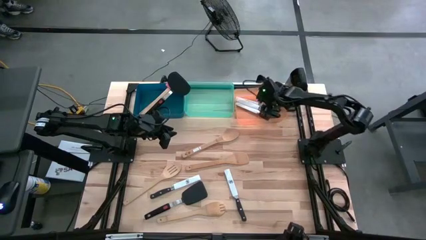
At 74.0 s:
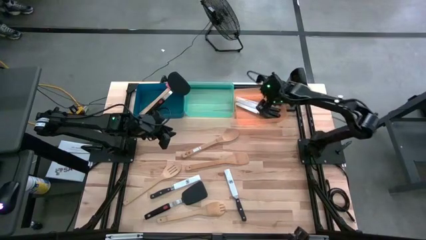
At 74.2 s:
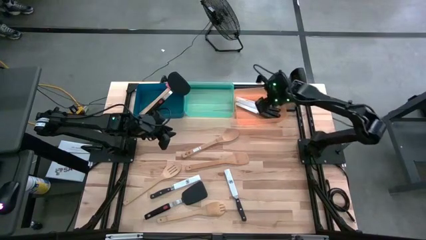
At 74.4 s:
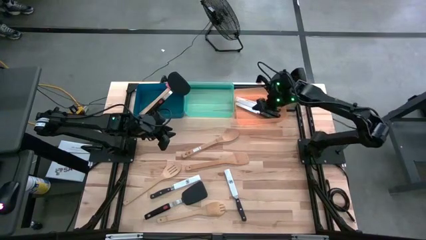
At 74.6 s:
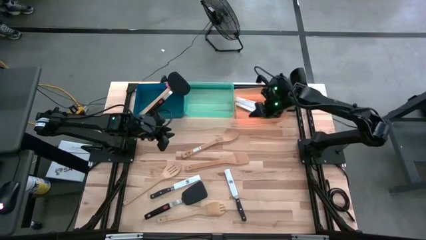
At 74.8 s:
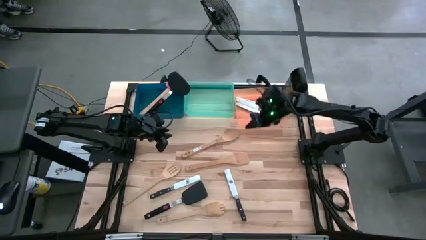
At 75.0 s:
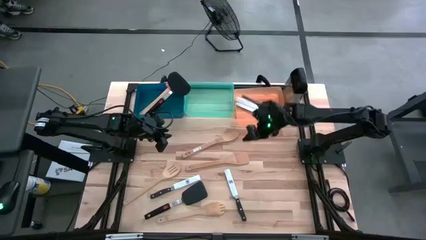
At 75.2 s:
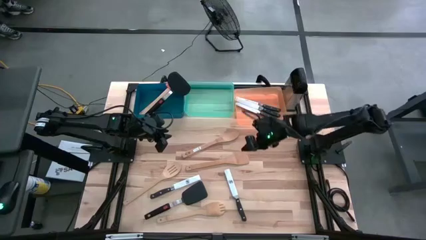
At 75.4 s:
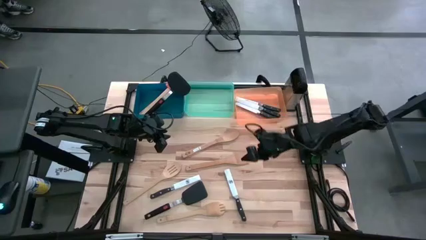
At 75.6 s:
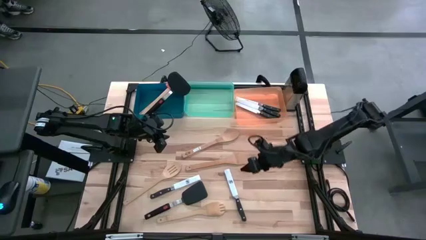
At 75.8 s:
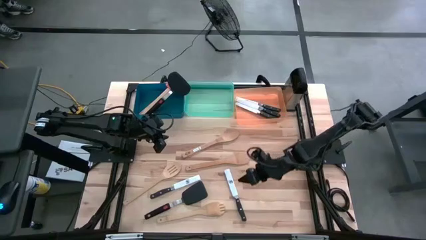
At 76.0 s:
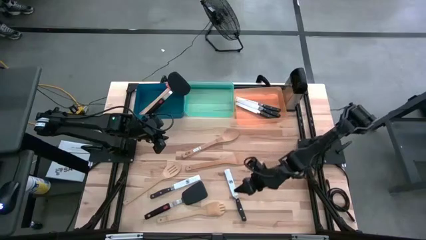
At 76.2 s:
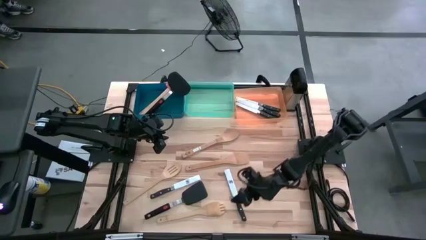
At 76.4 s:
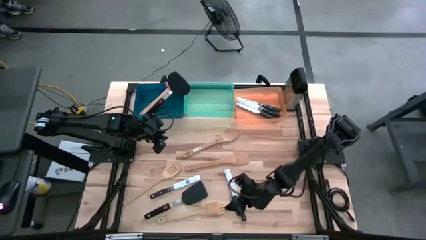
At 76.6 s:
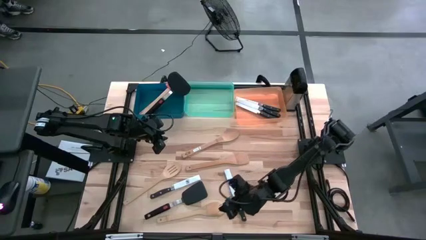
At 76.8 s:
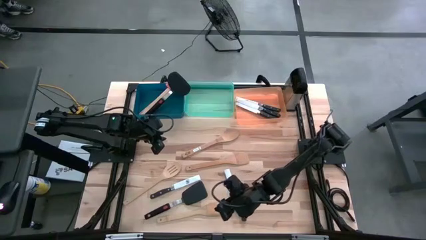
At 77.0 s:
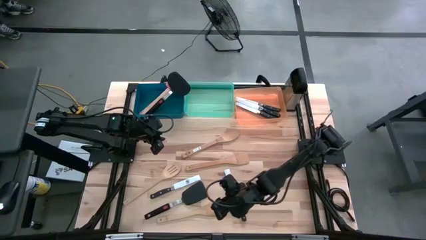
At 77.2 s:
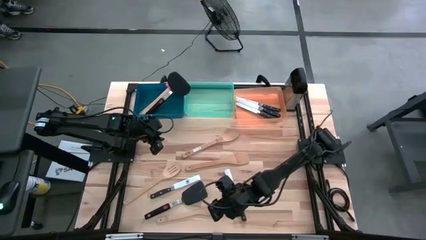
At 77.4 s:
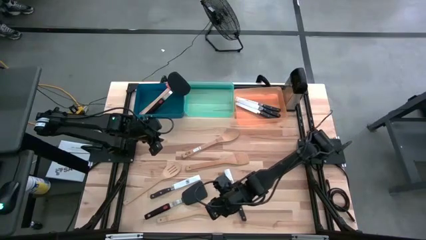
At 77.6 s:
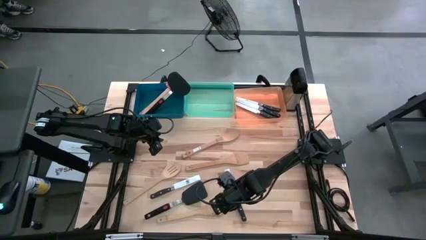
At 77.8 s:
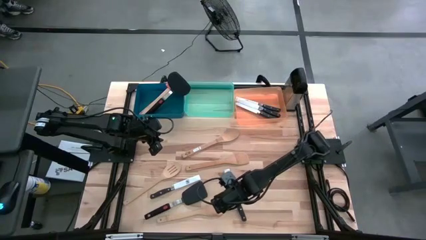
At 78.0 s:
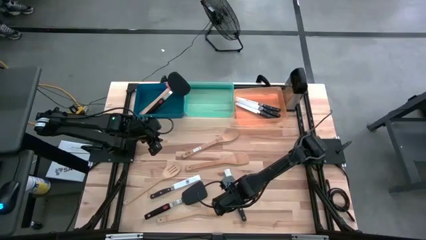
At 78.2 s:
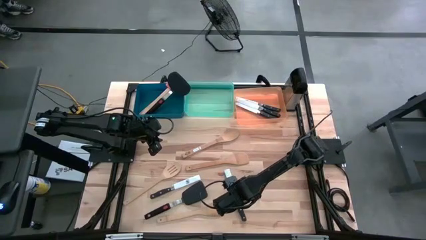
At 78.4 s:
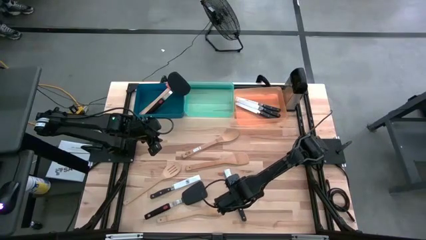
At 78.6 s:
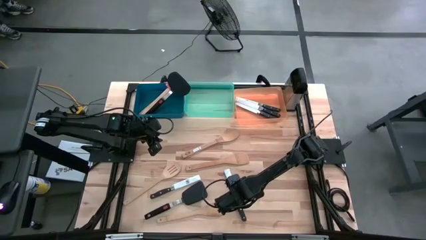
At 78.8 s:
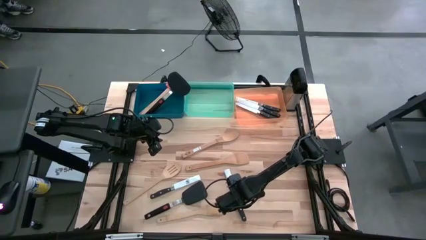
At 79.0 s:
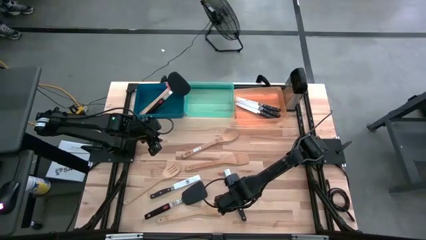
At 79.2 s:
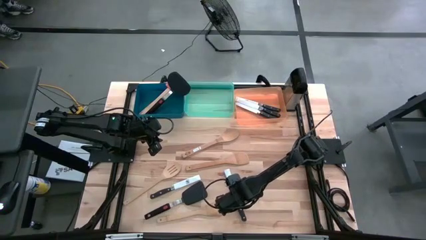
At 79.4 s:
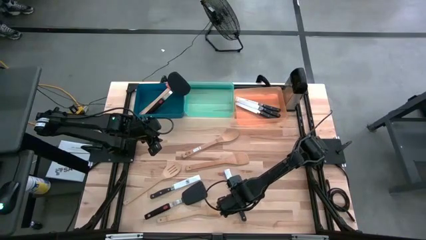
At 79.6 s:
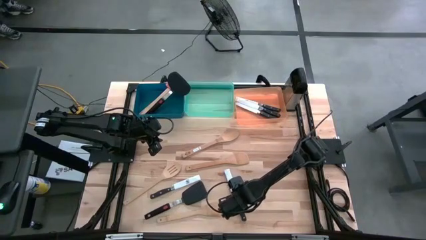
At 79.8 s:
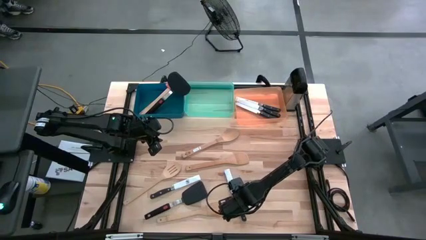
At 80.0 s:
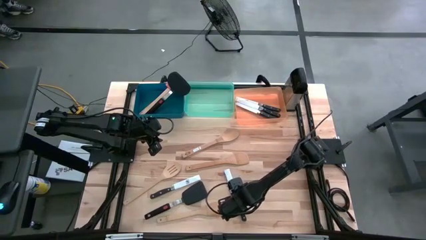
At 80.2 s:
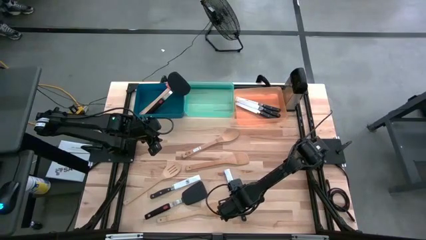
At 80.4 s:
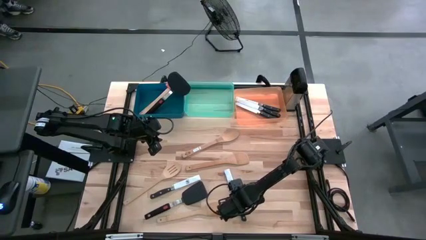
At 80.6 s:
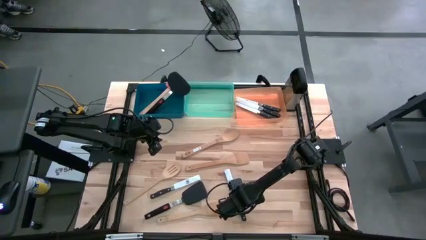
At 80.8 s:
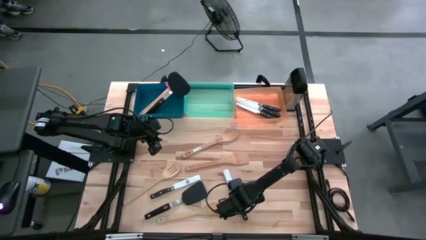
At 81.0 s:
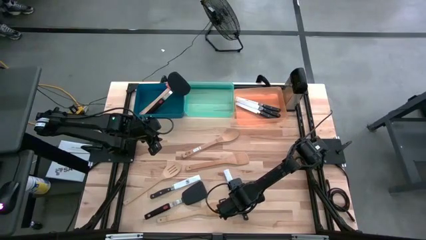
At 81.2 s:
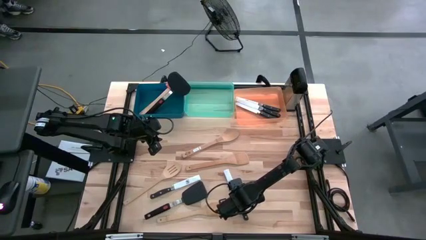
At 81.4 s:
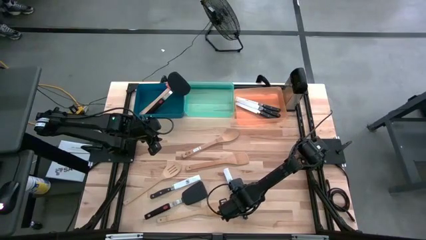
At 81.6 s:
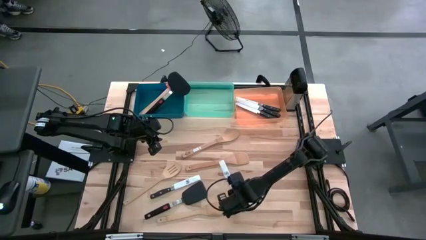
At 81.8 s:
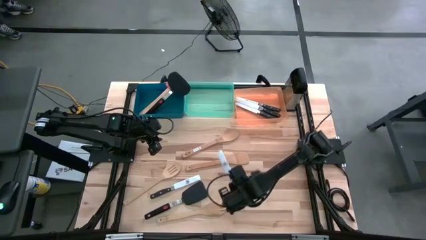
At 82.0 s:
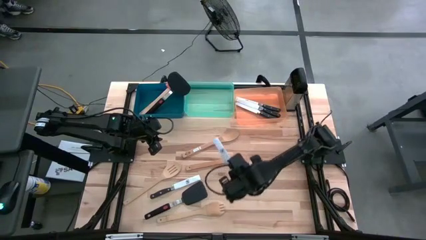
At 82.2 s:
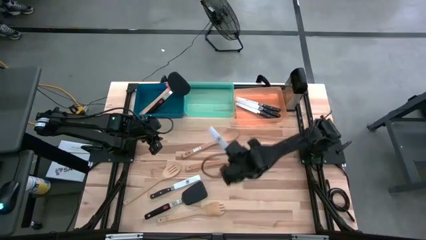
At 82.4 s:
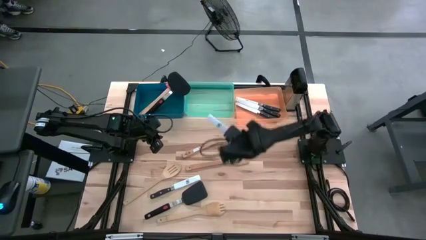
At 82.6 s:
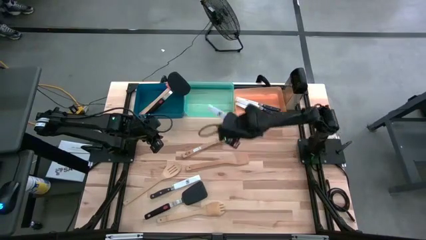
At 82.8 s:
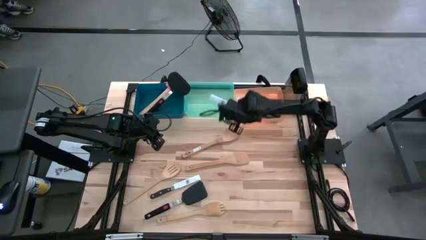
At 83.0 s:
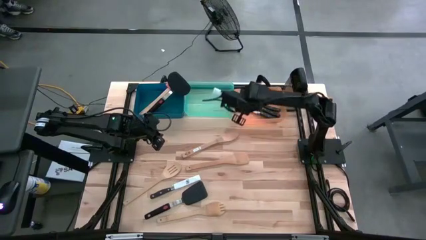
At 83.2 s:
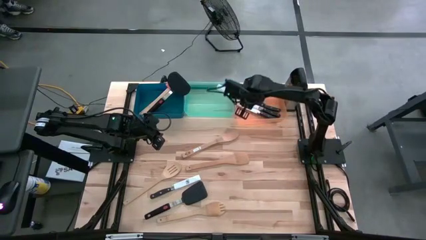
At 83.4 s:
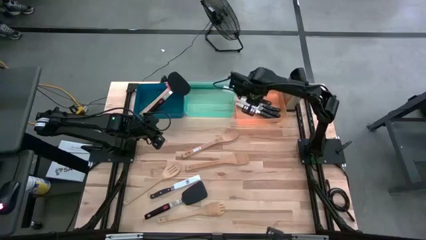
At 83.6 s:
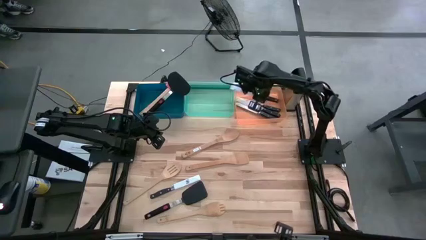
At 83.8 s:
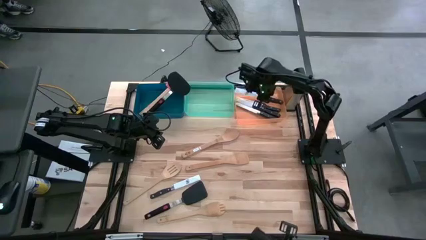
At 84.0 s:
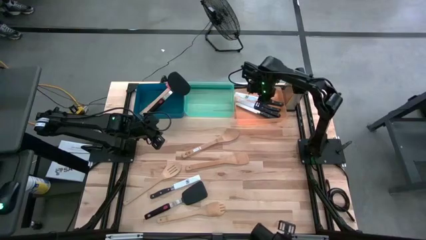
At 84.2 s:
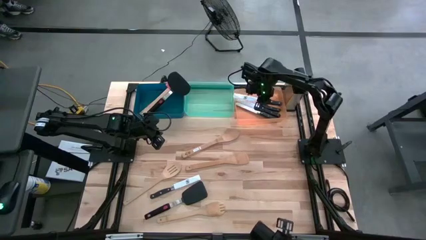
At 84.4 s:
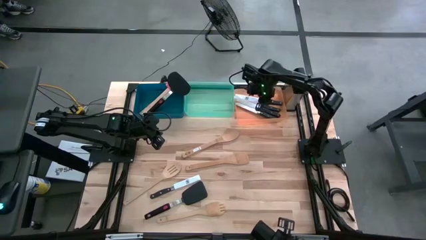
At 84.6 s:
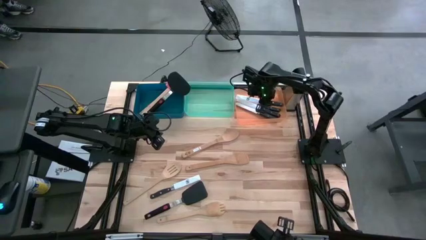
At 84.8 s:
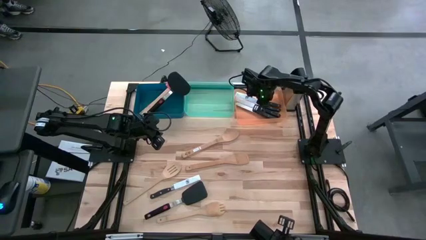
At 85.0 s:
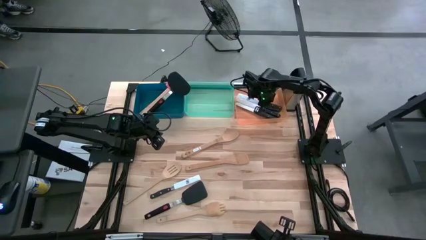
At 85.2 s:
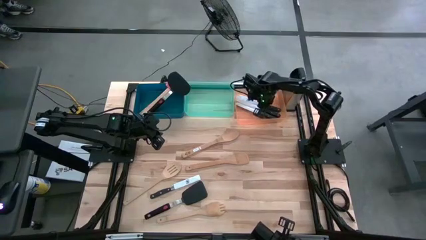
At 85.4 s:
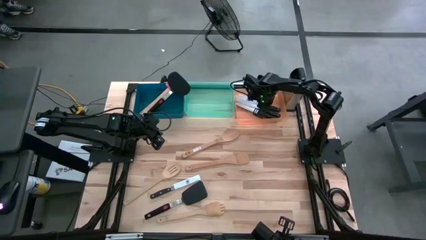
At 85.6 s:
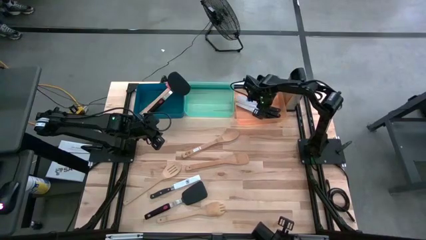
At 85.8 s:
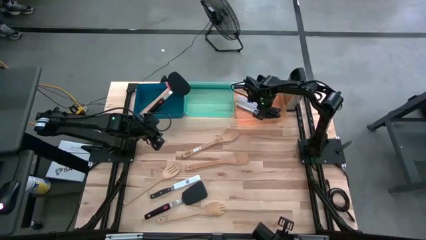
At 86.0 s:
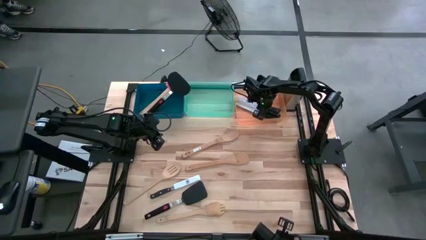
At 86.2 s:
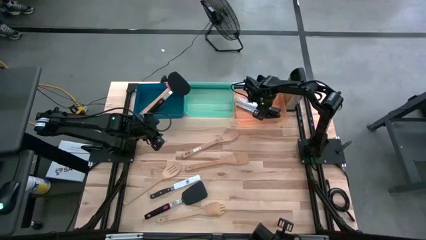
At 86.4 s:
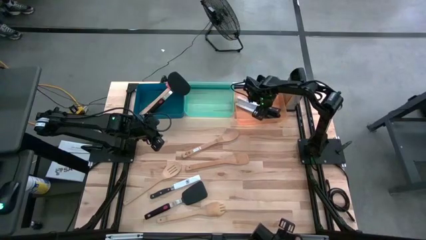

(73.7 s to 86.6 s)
Task: Pick & Place Kitchen Items
Put the knife into the orange bin
